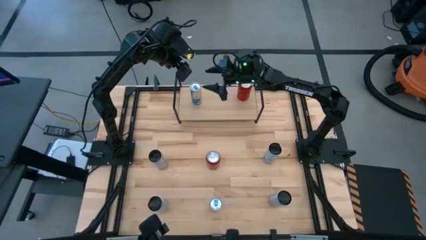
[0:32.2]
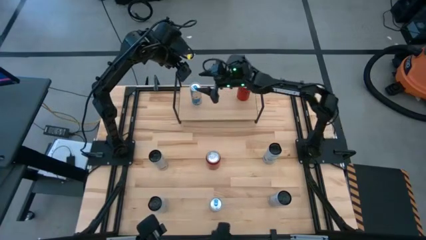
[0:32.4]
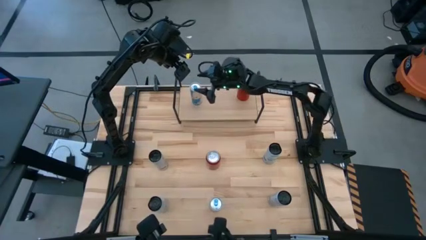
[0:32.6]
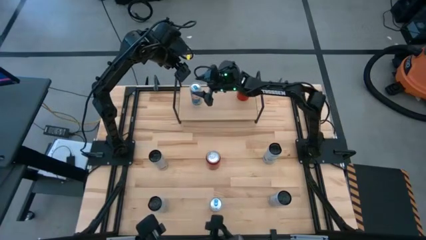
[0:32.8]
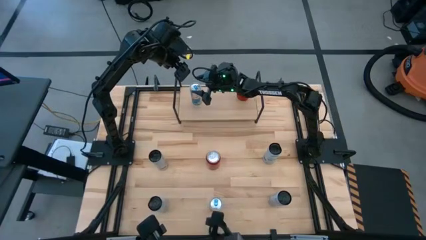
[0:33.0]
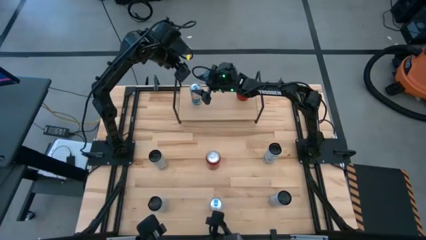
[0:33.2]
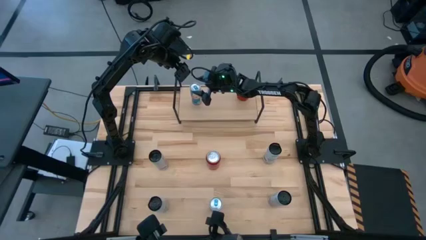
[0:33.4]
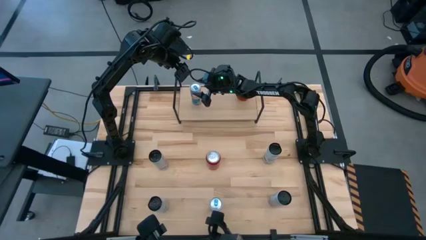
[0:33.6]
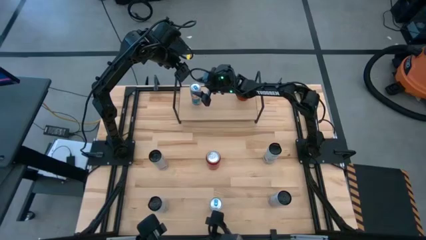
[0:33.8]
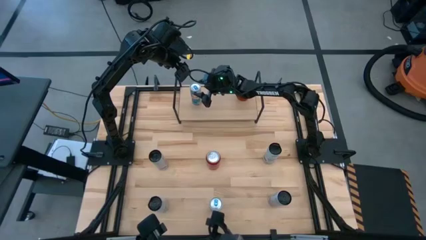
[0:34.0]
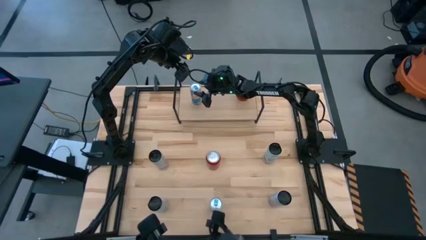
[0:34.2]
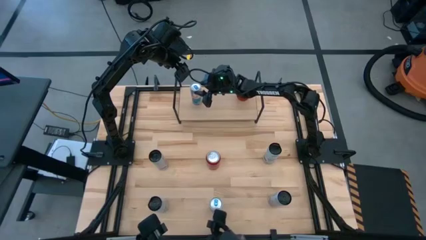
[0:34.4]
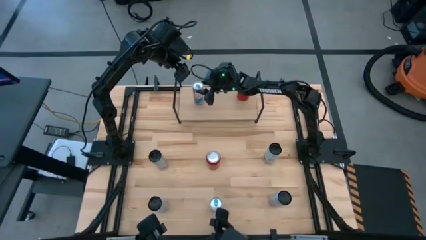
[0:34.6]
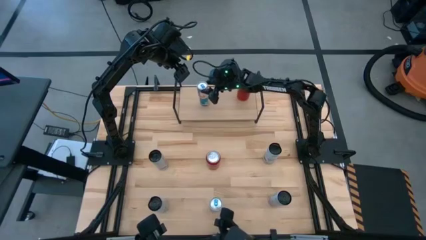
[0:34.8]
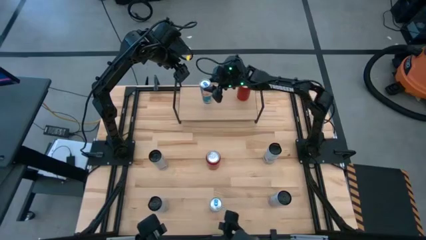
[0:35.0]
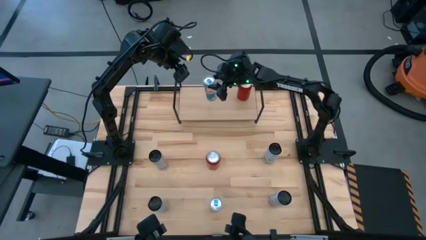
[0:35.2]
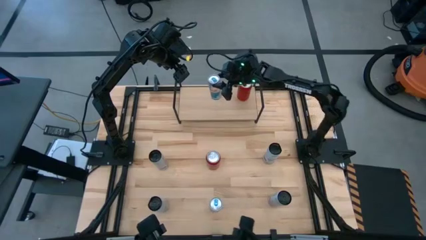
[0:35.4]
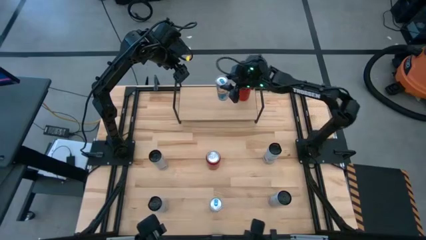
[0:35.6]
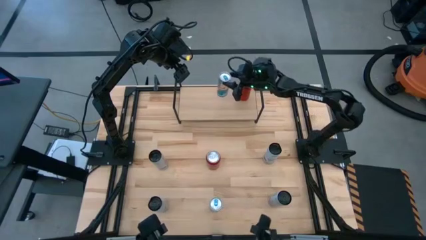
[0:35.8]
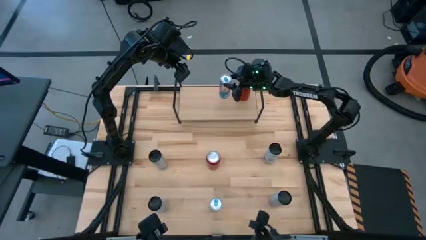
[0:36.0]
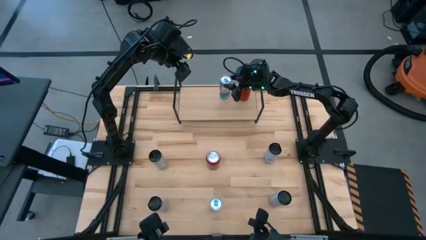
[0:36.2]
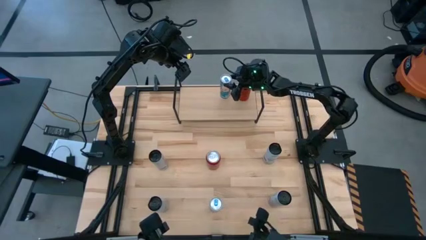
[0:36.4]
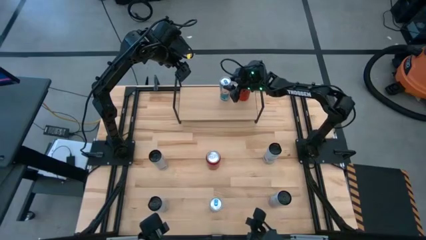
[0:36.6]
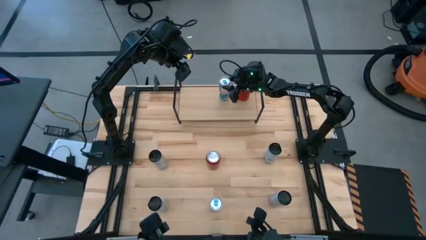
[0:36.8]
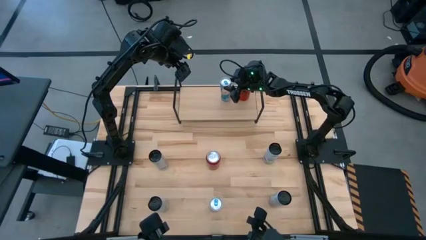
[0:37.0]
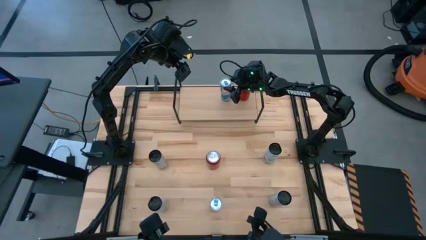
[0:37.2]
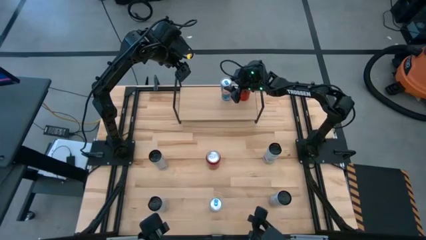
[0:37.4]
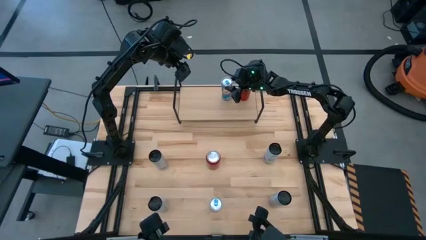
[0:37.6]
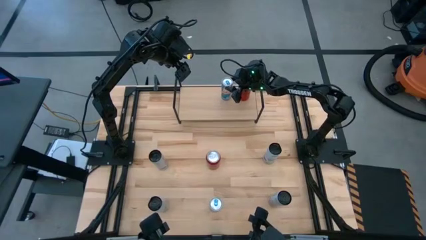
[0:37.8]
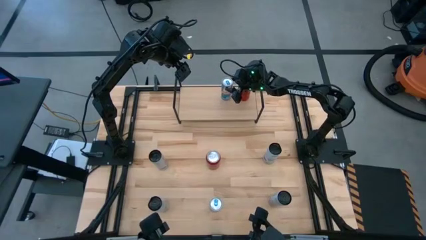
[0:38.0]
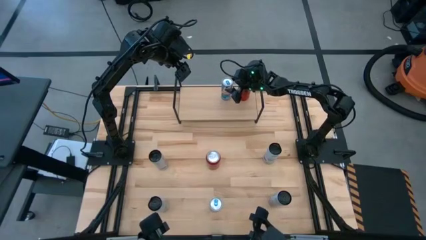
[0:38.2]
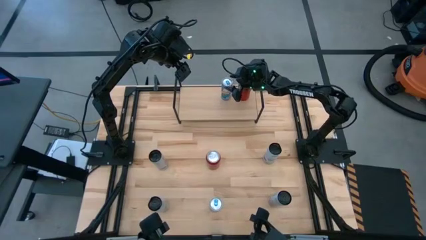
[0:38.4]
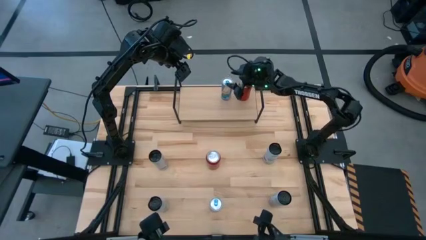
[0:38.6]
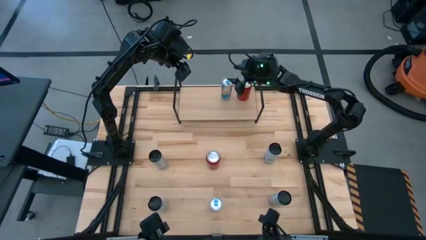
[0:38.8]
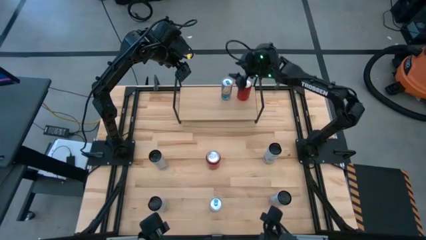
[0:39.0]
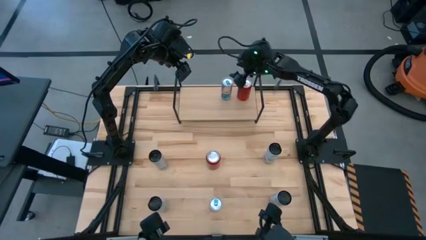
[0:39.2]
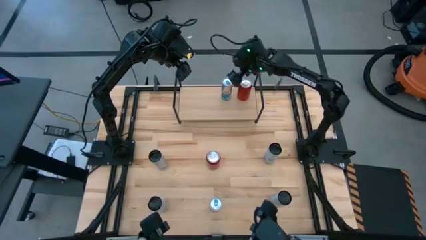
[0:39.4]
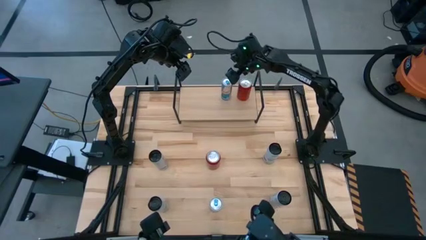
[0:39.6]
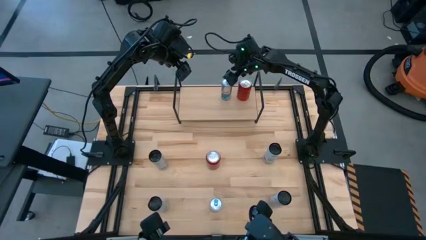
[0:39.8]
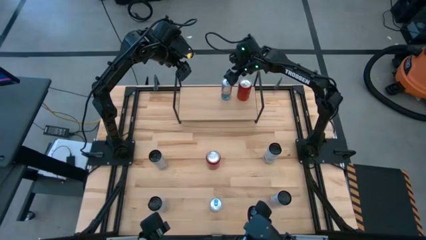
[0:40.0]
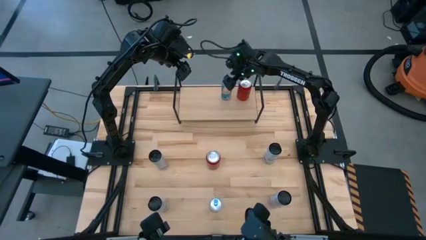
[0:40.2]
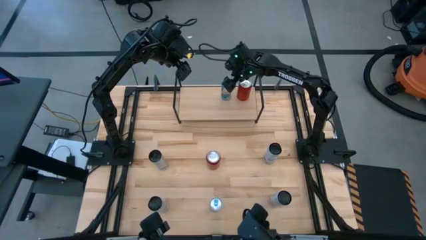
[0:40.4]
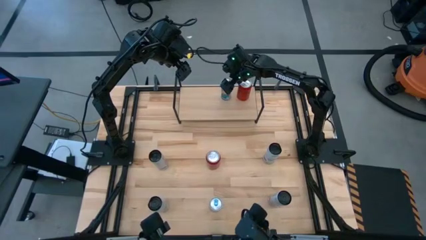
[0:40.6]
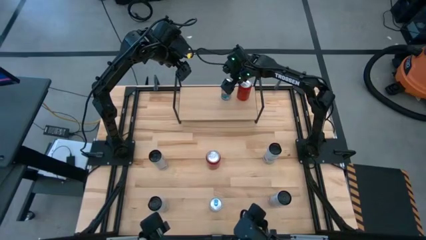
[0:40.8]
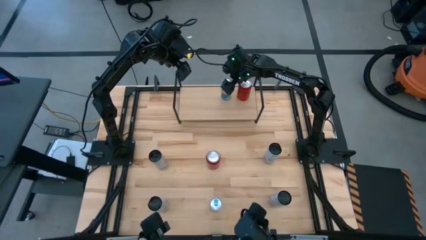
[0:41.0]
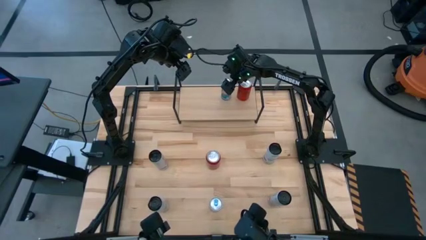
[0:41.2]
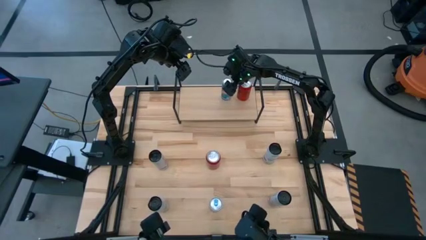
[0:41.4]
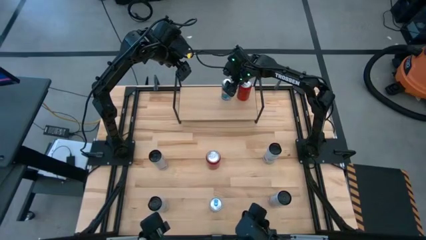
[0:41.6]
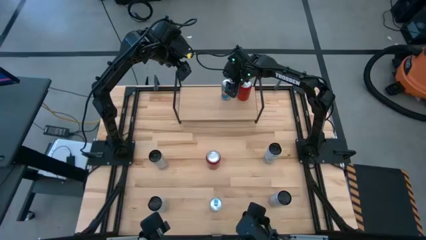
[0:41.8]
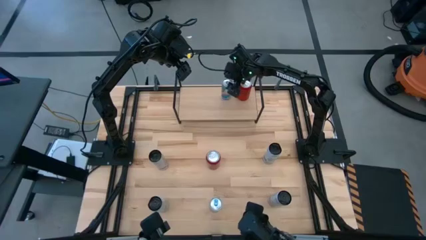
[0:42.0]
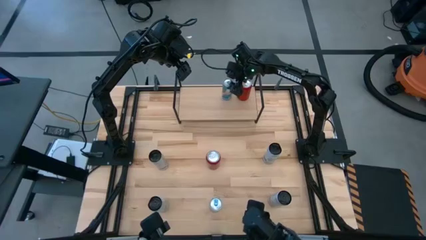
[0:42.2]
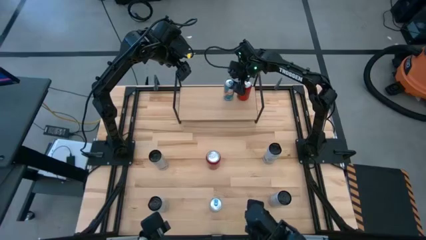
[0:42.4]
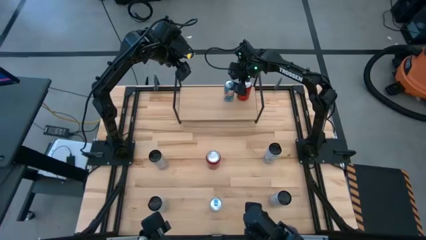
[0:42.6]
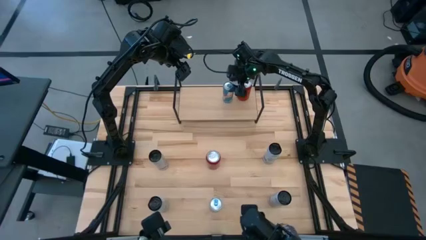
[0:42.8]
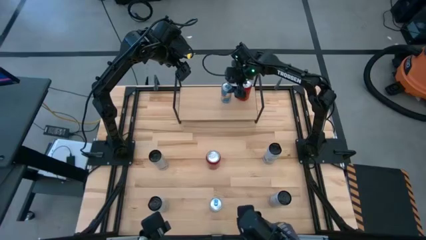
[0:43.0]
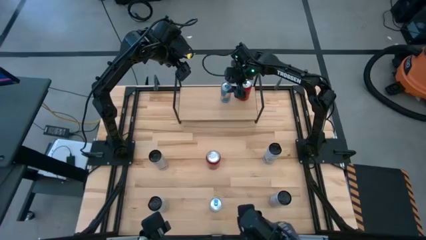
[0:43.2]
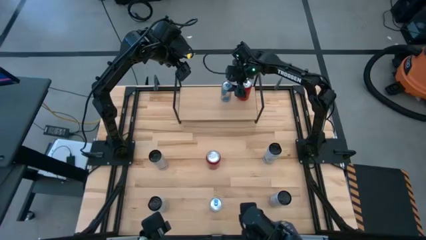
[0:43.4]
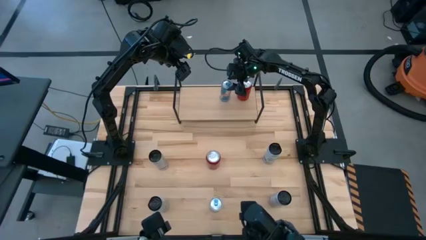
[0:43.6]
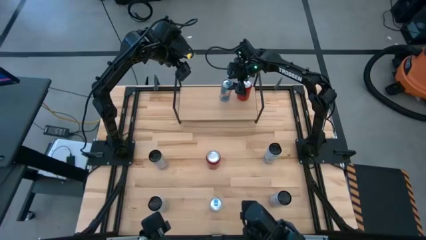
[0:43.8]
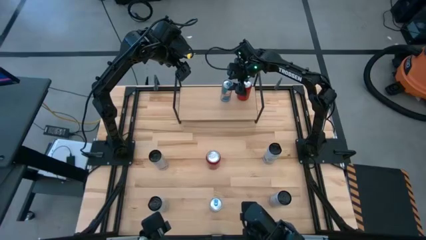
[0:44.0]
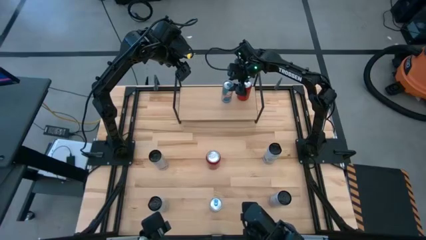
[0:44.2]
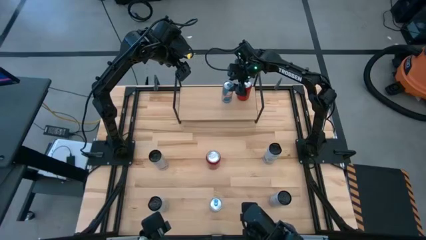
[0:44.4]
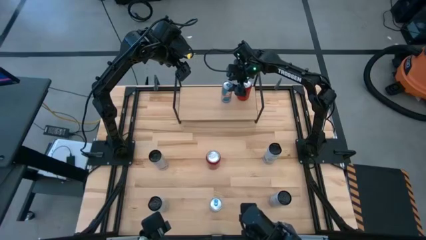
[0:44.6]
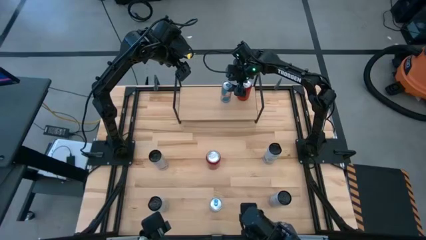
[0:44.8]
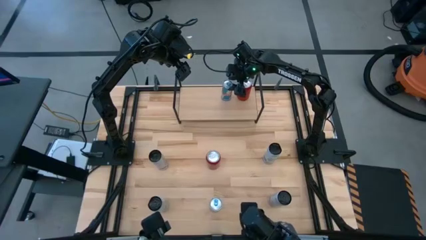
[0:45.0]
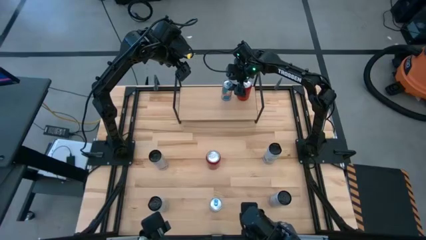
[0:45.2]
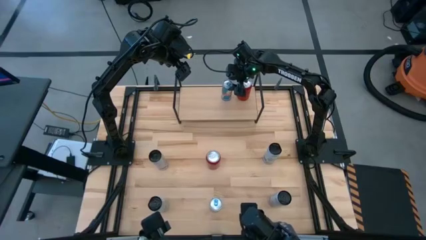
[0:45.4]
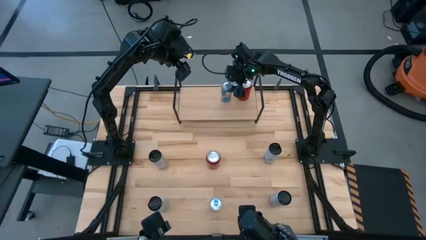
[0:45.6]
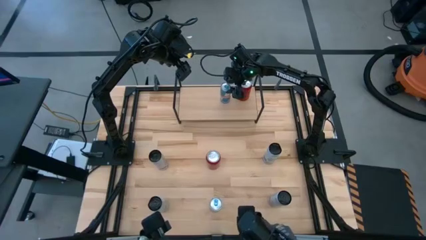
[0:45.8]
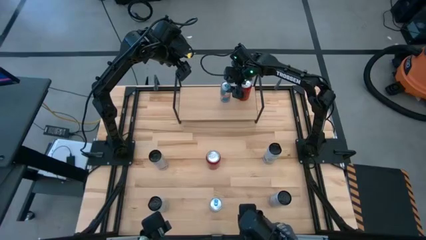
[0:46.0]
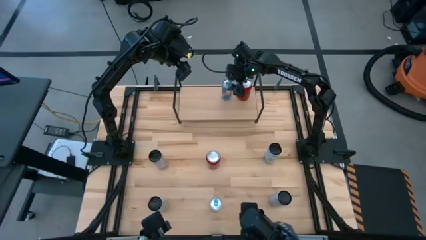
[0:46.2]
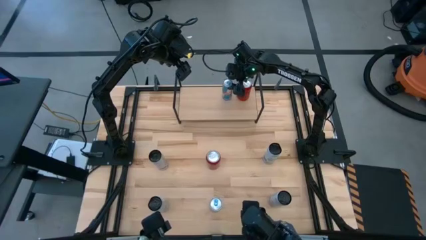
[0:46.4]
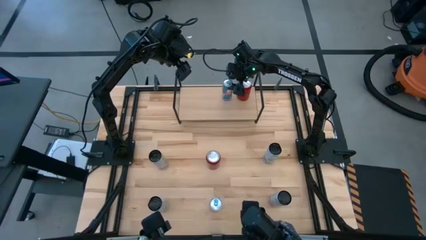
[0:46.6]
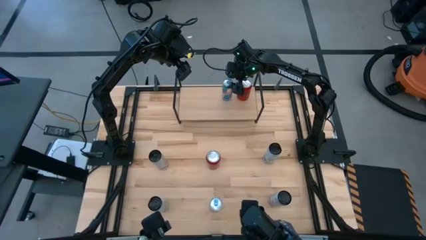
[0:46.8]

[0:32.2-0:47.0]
Task: Place canned beverage on shelf
Put the top blue soda can on the shelf

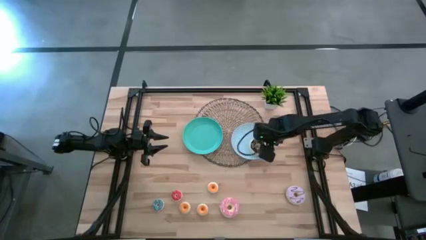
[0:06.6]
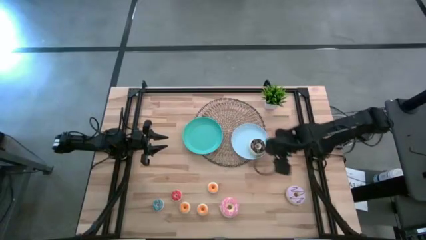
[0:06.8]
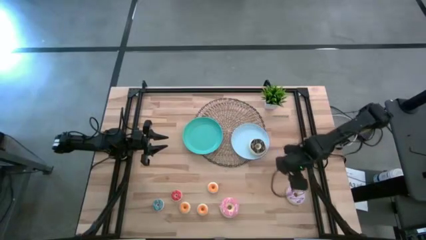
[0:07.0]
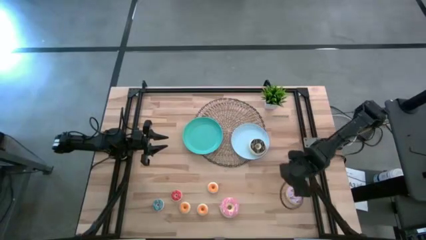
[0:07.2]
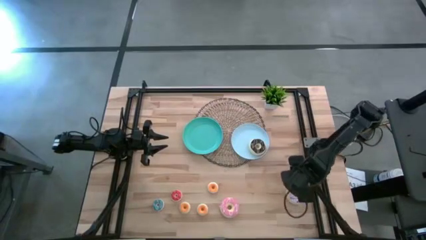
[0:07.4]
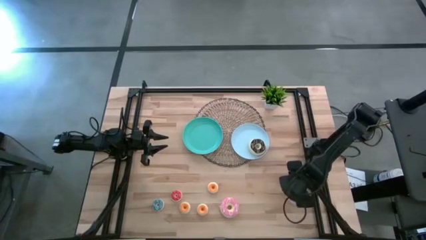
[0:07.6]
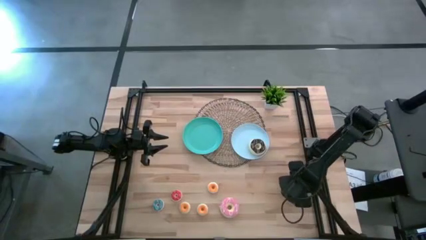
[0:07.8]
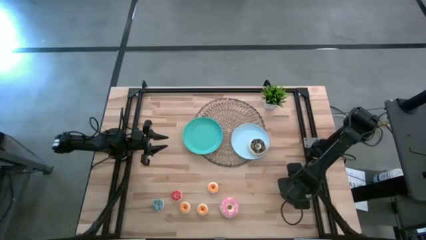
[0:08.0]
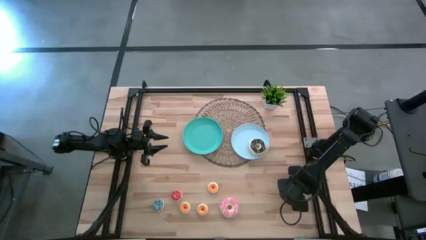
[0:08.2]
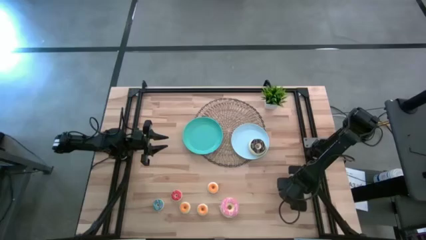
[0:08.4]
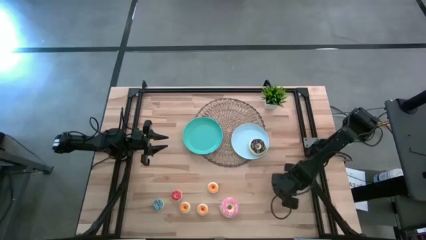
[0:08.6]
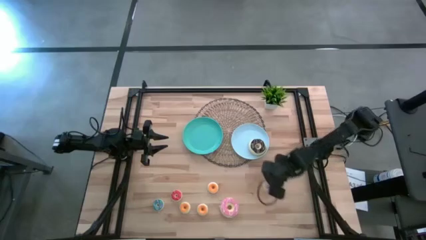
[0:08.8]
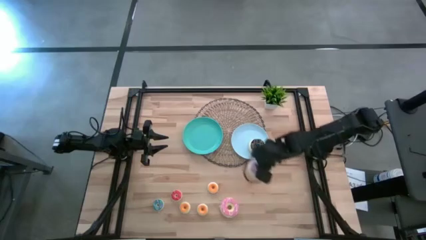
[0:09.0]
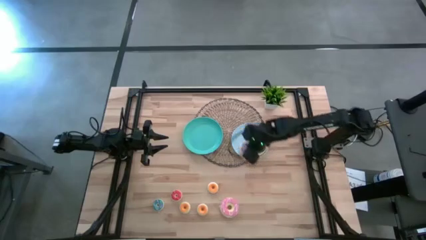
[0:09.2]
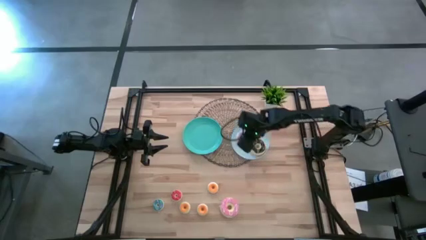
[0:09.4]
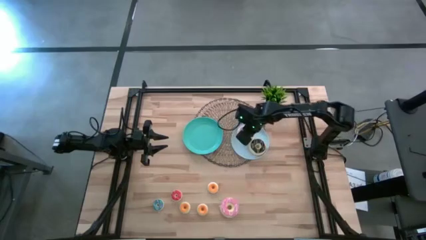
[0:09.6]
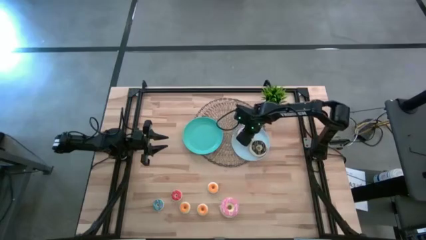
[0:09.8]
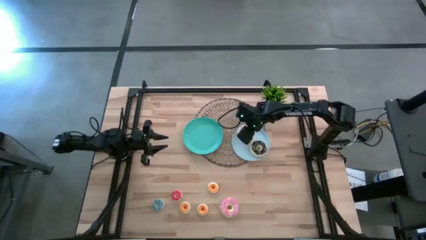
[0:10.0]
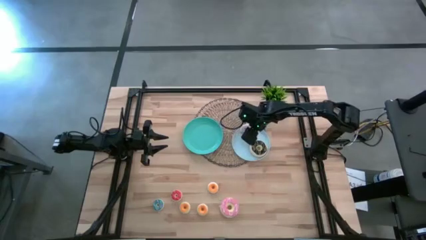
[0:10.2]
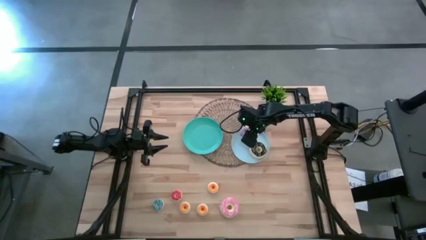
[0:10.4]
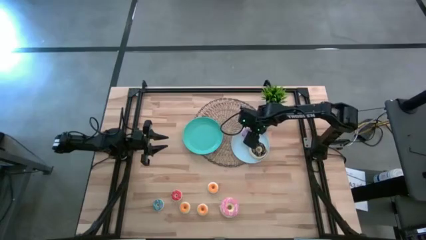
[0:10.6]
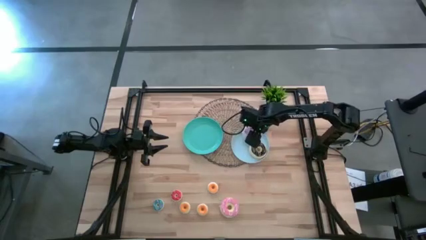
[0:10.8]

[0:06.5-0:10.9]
Task: Pick & Place donuts
Put the large purple donut on the blue plate
